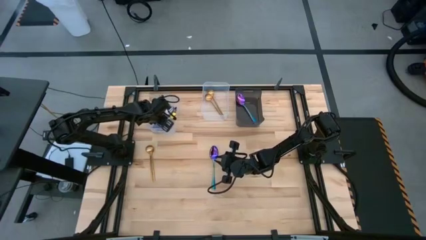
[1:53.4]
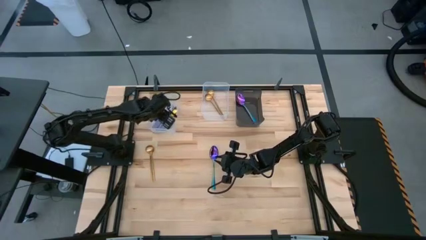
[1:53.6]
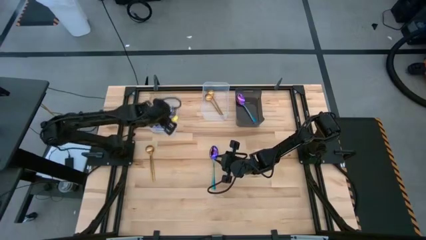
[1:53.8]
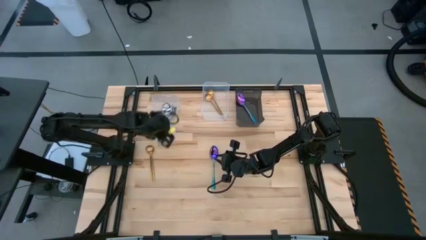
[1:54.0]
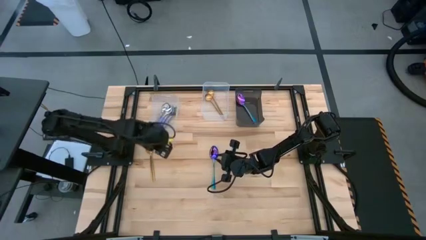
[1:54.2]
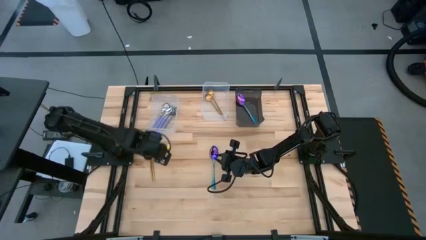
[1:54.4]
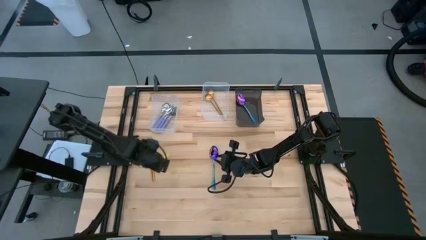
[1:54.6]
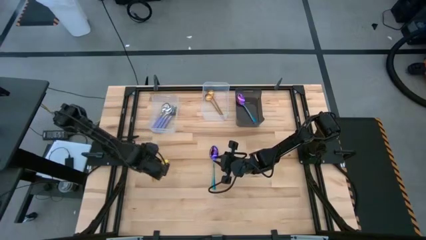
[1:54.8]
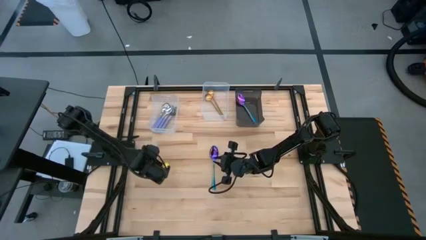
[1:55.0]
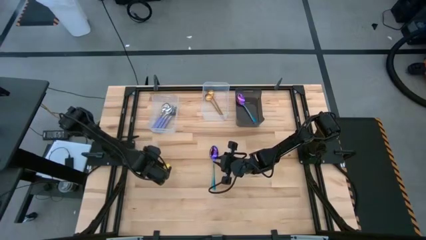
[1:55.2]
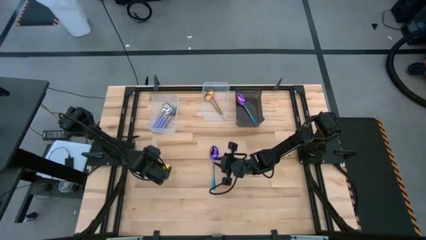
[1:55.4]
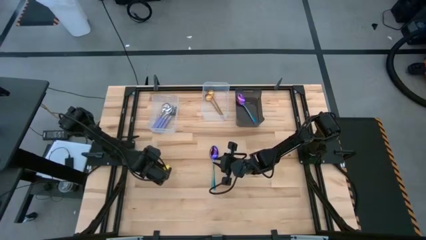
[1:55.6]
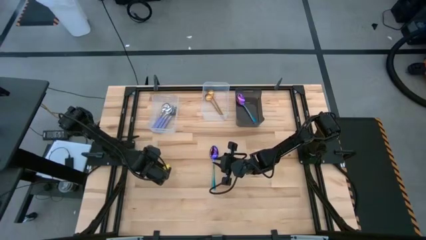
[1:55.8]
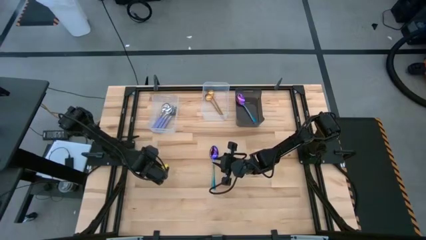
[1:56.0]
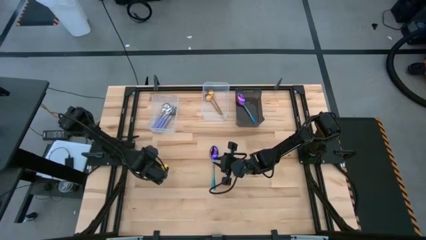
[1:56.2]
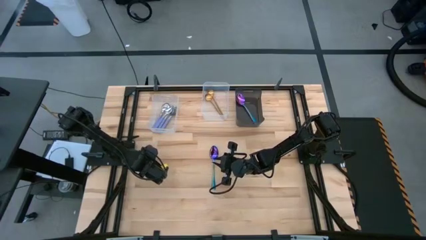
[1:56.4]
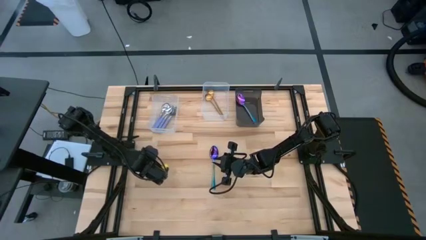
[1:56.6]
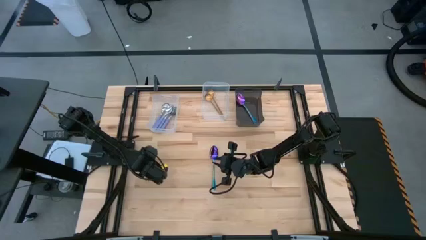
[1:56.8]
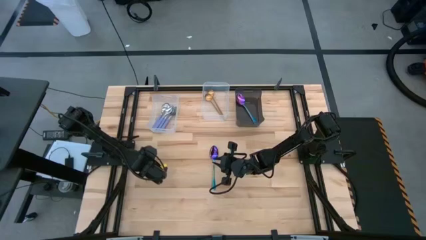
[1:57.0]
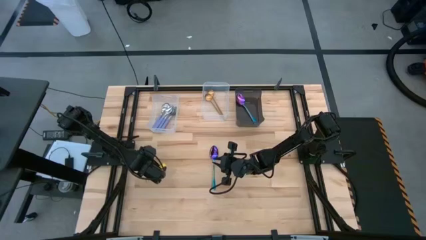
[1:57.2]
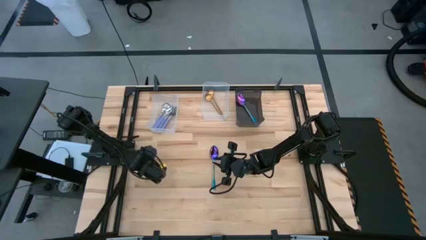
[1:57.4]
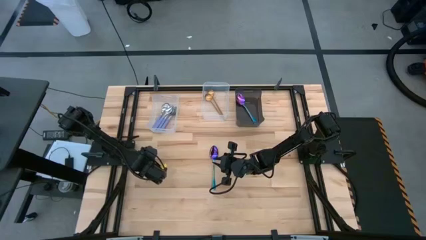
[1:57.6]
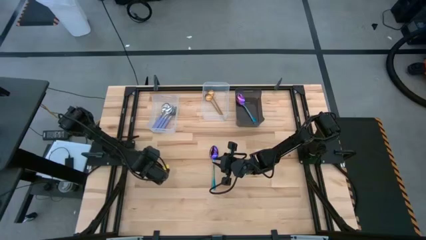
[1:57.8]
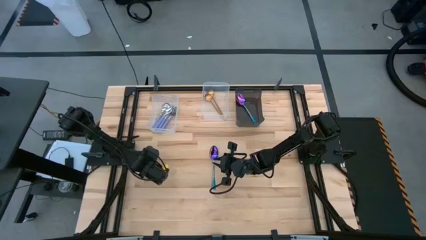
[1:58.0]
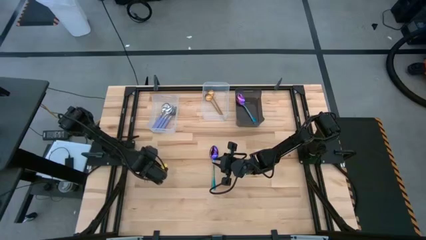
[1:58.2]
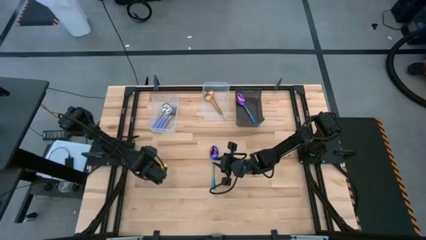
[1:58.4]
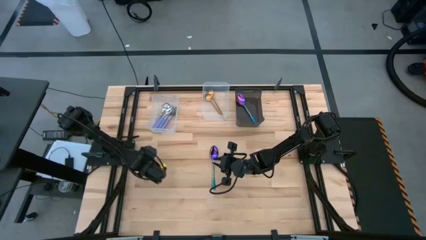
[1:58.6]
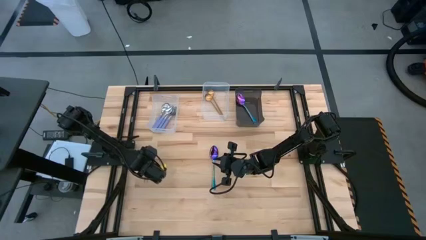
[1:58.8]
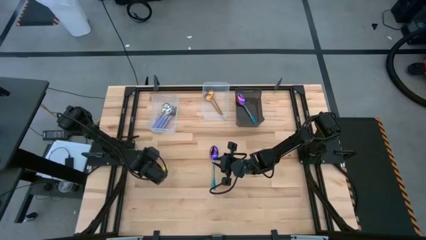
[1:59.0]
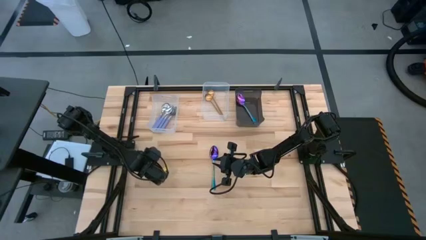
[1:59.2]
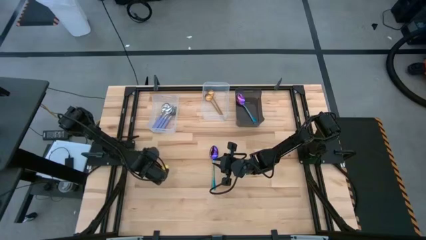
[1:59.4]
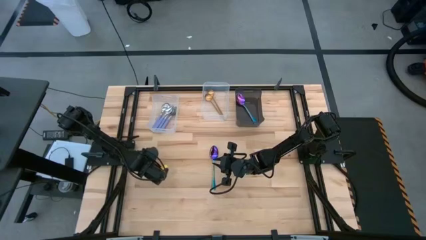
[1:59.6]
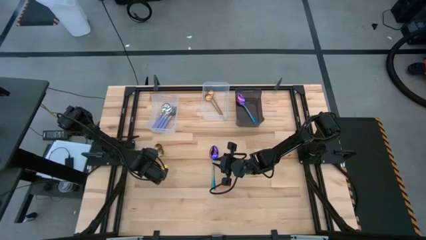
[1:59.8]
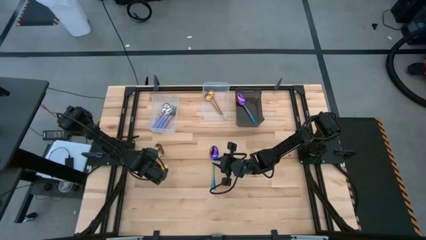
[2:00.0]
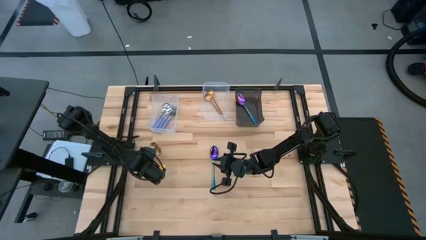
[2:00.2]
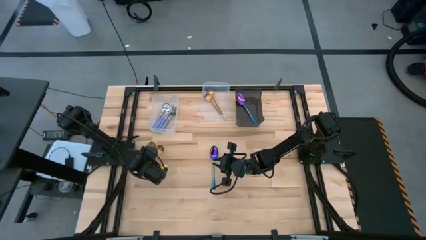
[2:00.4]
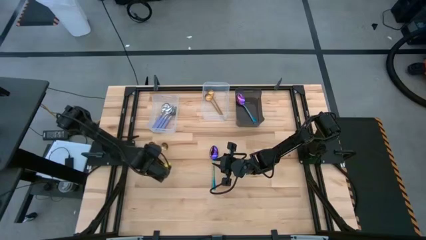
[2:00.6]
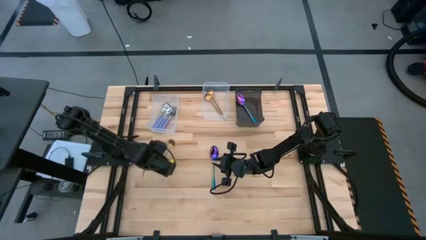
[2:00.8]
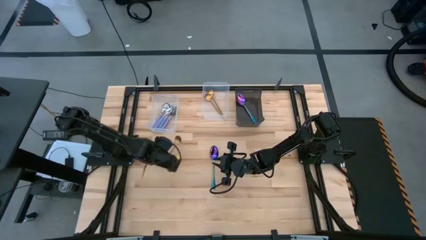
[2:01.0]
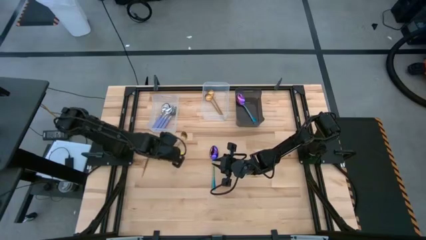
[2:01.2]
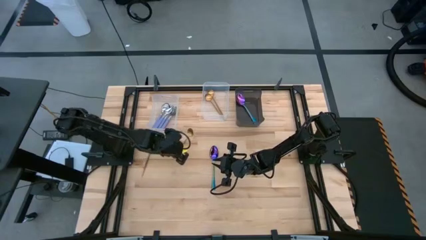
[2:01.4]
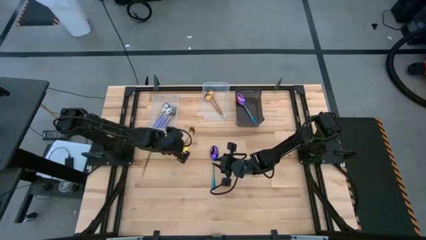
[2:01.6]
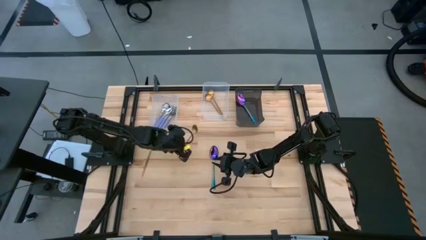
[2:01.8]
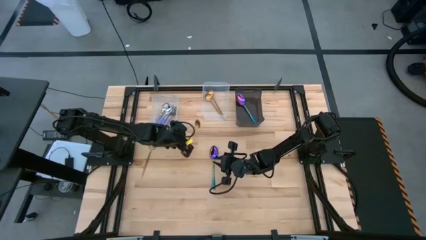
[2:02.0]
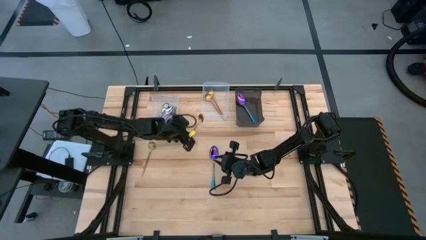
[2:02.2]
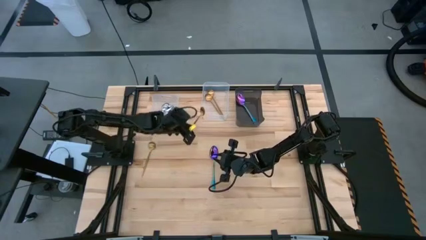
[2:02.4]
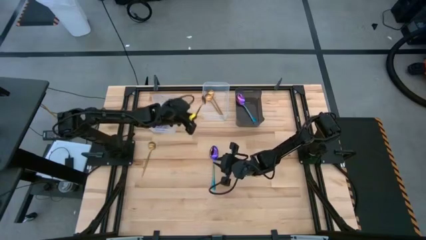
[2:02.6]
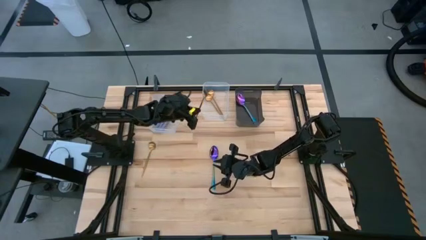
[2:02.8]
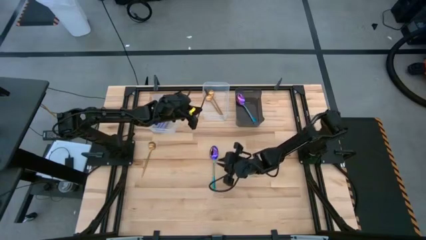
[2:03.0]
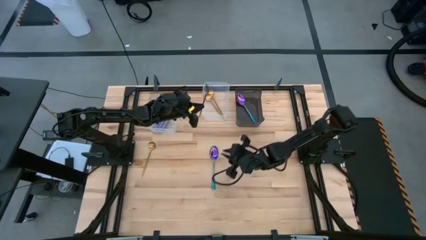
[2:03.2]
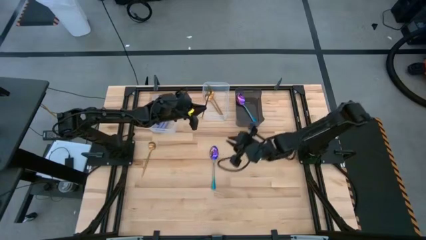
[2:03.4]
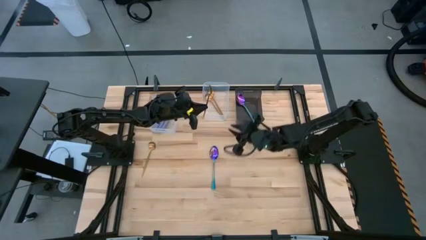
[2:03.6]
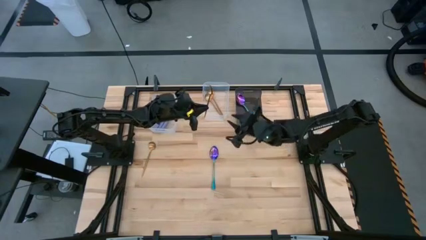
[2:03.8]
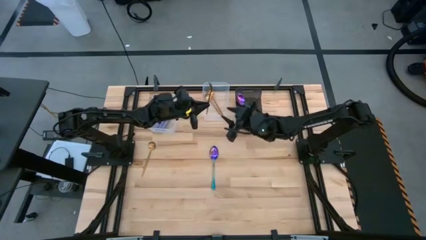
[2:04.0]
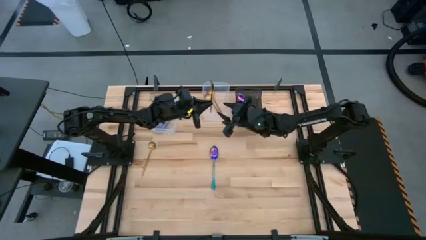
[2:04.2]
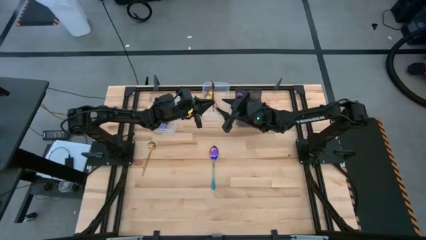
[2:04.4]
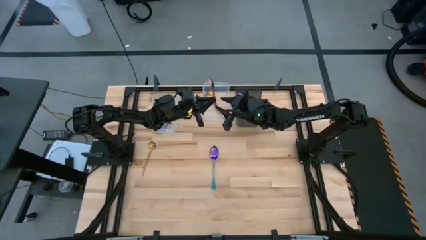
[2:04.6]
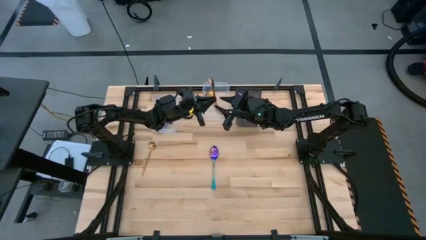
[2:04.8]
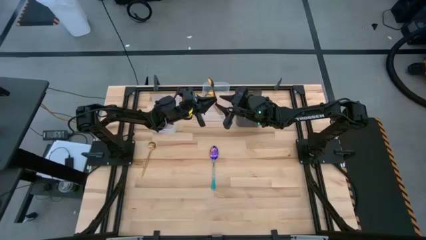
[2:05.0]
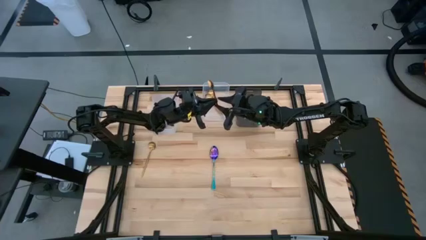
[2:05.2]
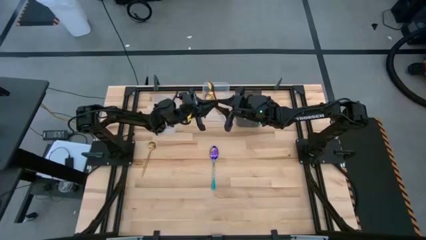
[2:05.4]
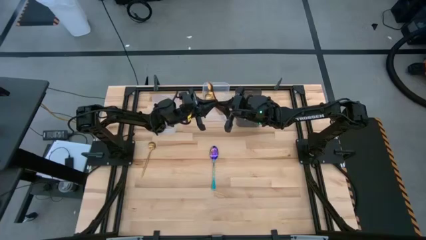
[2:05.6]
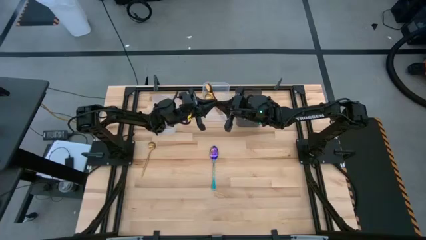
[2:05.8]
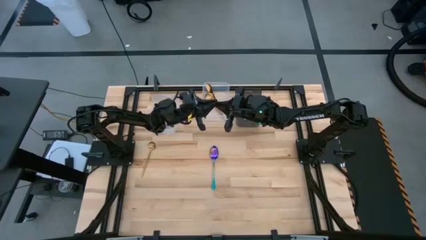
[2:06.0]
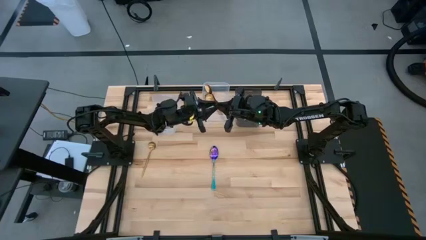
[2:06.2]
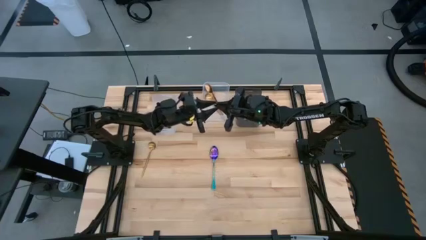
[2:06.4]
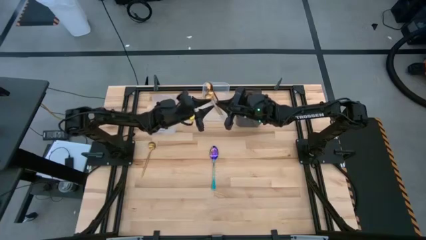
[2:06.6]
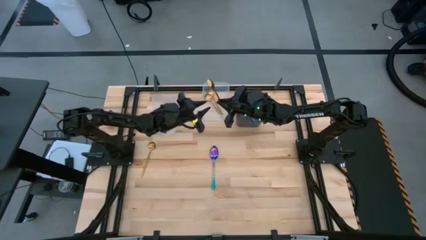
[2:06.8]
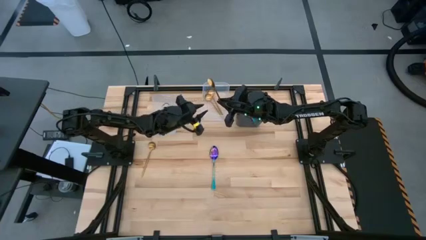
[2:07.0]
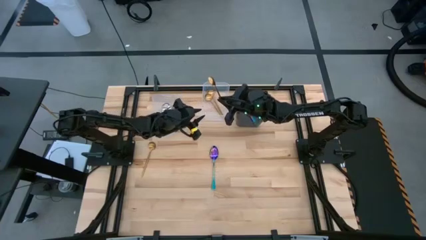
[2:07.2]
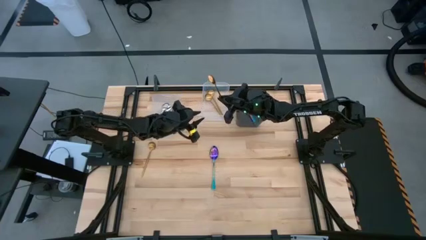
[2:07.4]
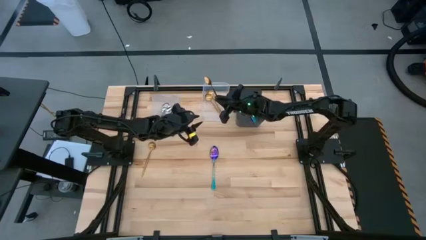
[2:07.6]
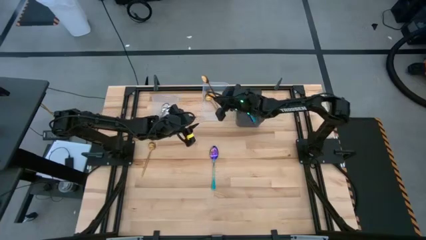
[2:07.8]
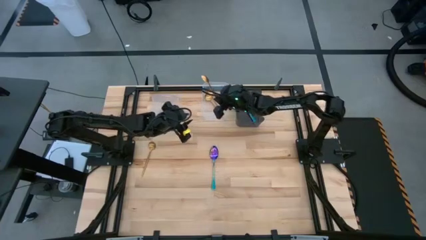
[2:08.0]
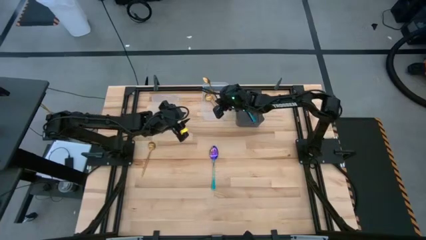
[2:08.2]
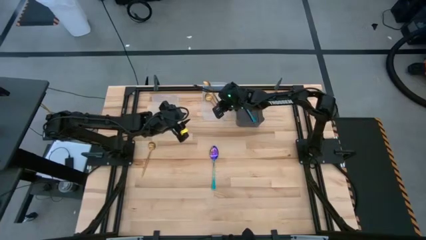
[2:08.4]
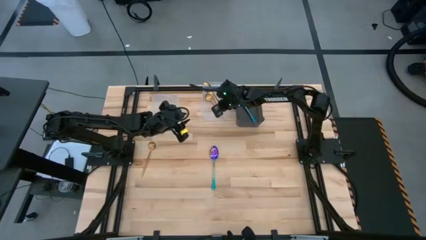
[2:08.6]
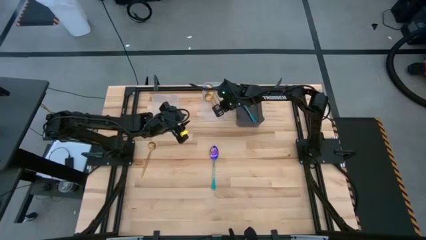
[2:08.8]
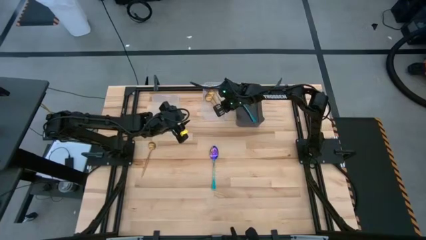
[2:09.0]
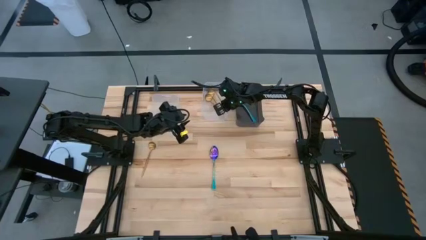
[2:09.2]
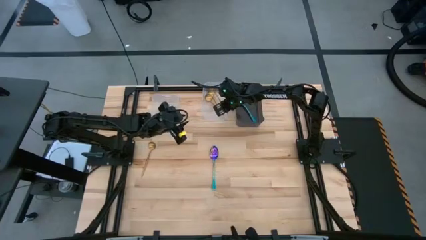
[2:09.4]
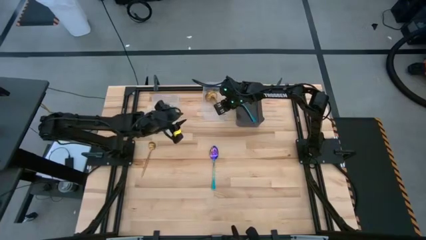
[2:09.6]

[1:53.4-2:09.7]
Task: Sort silverware by color (type)
Put the gold spoon into the right transparent bin
